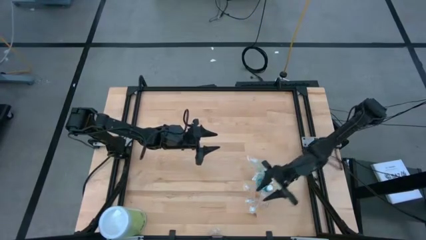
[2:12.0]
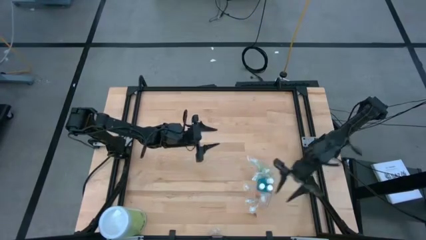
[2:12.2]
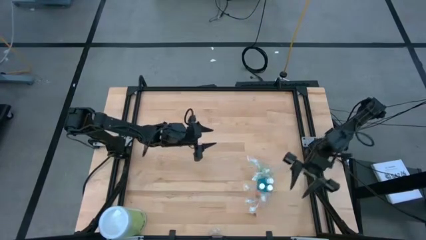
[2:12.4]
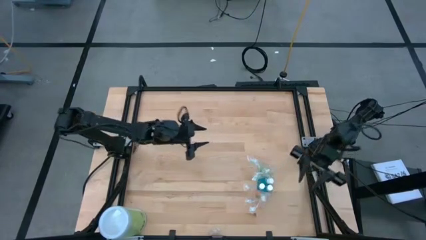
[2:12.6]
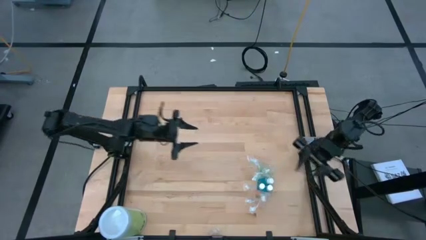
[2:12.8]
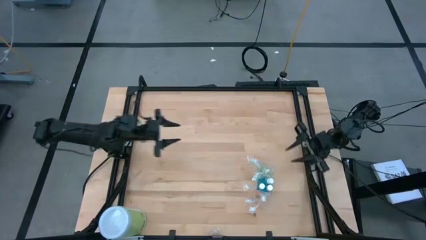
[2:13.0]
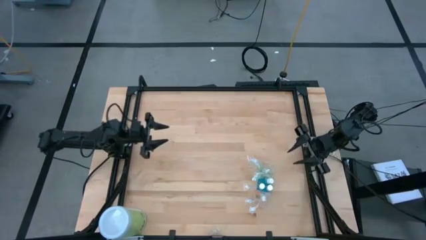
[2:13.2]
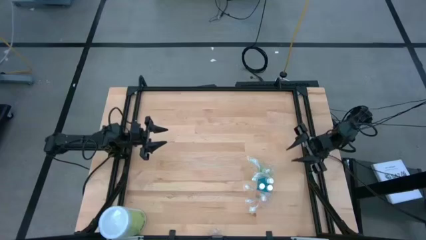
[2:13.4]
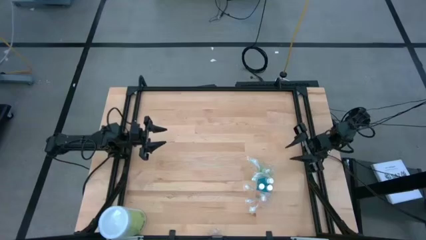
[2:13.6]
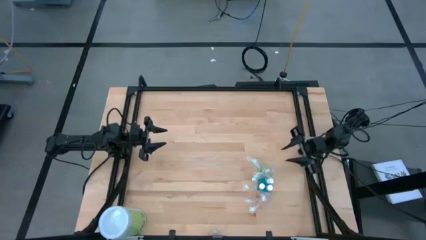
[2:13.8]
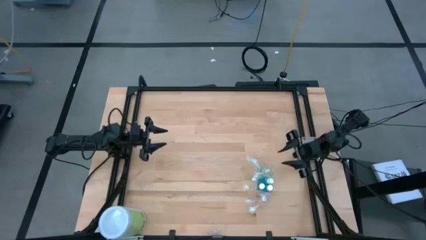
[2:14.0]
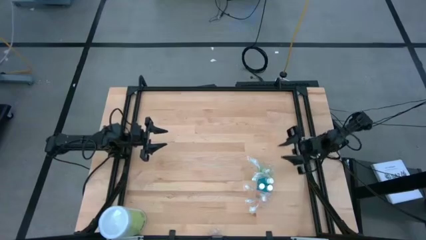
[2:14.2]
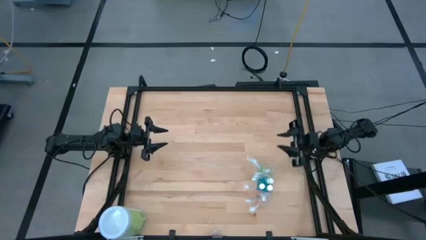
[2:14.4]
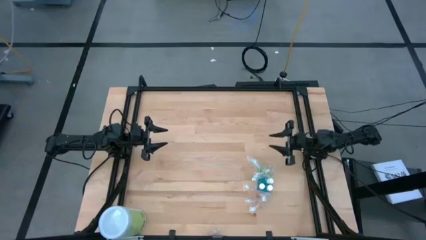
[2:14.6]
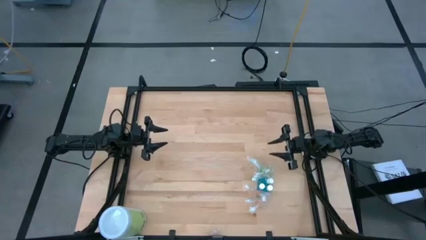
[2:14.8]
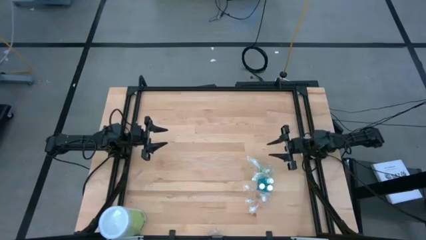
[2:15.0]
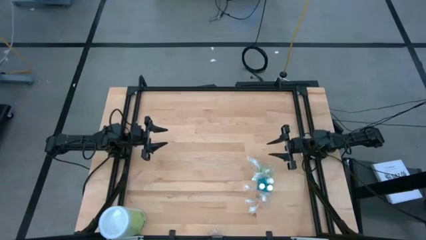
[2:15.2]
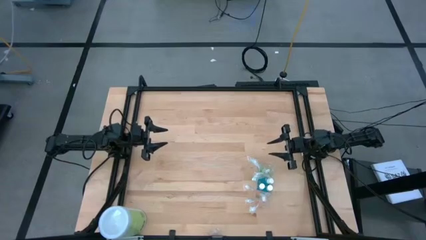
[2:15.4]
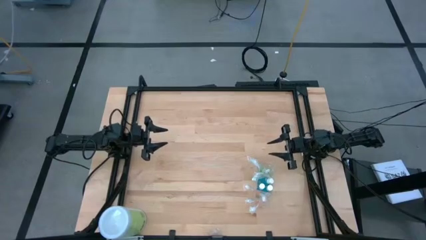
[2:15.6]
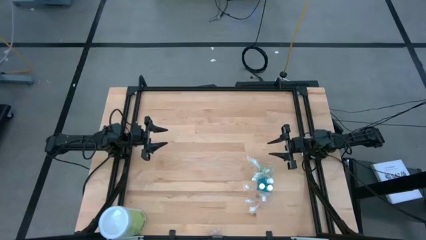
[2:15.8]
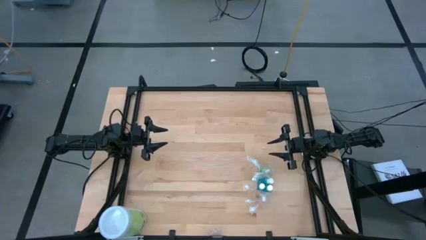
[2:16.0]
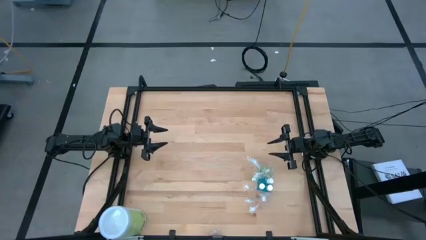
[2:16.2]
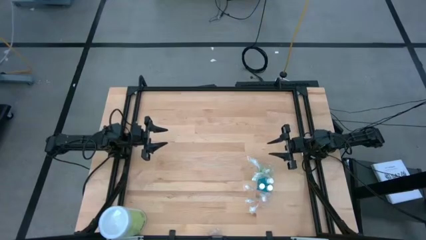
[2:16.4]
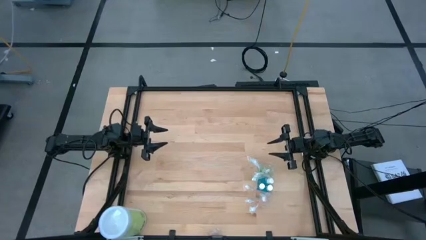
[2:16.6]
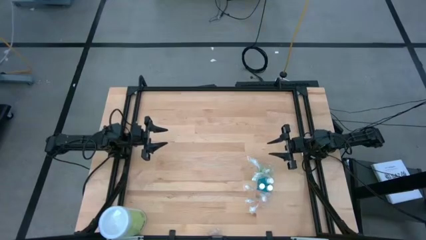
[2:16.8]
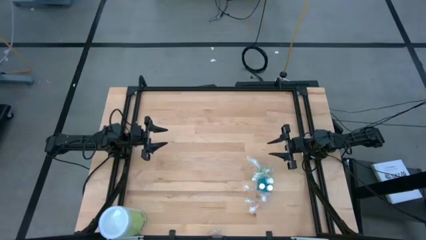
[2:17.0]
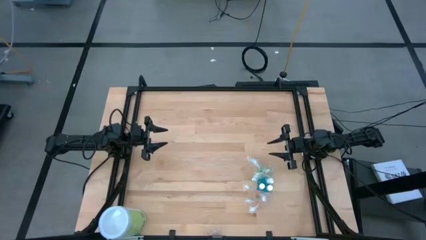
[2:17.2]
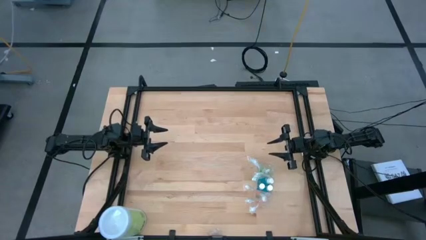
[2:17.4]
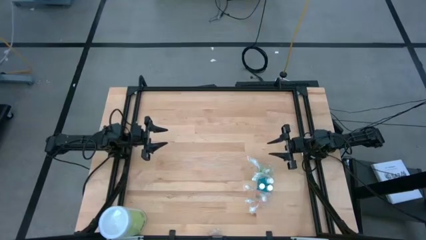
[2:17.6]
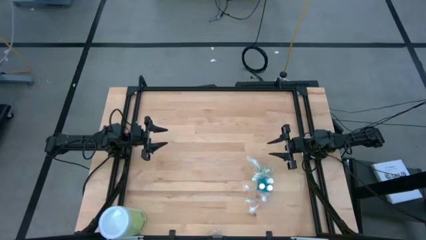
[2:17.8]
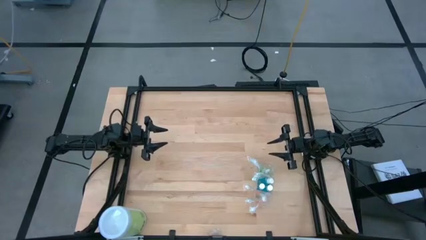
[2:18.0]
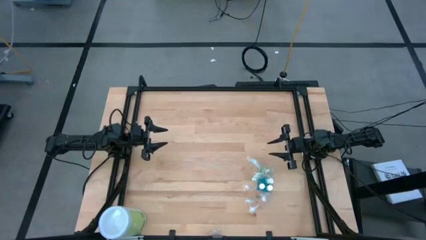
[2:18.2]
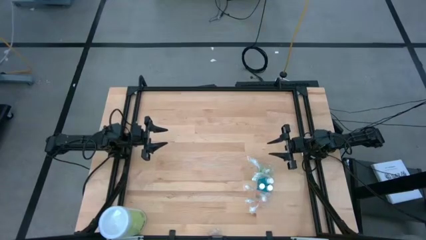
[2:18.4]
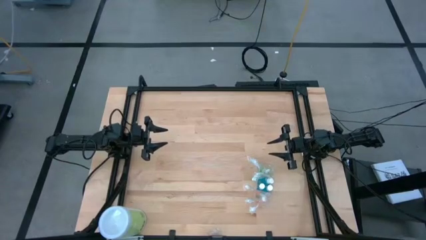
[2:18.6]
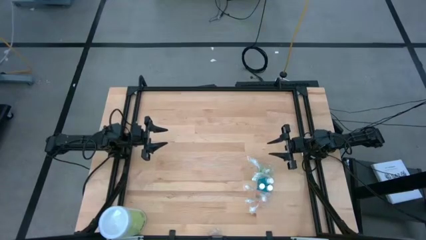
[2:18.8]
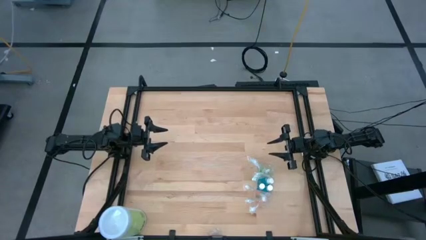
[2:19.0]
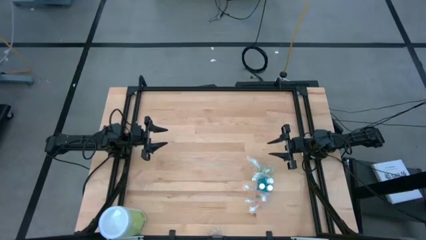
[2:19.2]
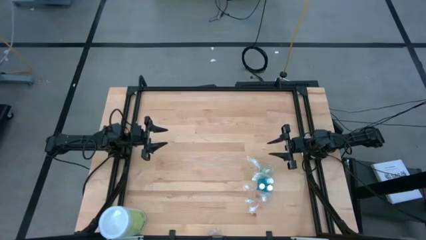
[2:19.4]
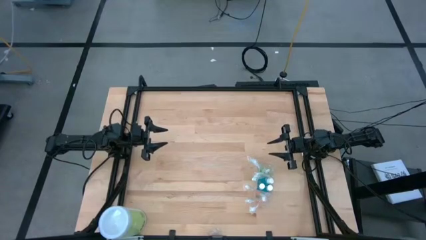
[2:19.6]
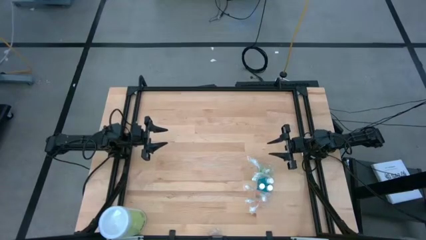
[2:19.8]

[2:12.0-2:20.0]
Task: Pick & Place toothbrushing station
Return to Home Position

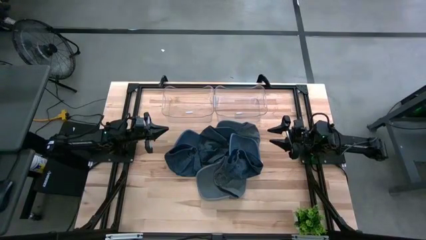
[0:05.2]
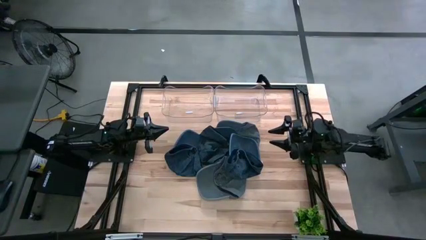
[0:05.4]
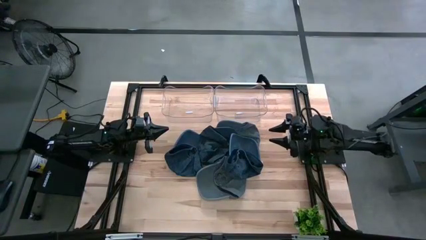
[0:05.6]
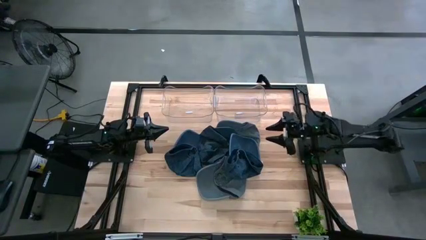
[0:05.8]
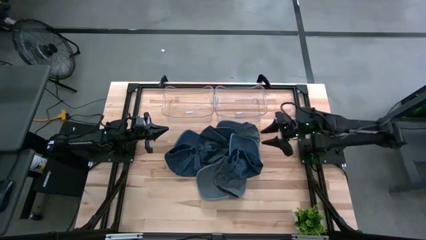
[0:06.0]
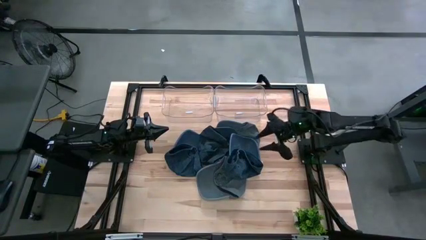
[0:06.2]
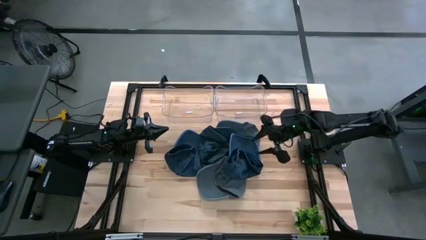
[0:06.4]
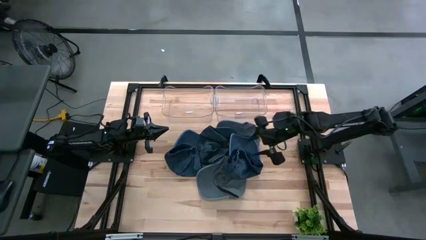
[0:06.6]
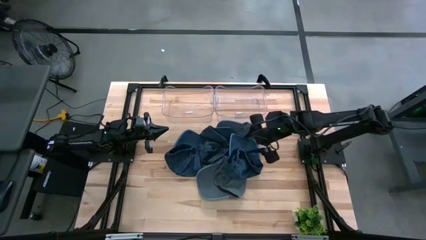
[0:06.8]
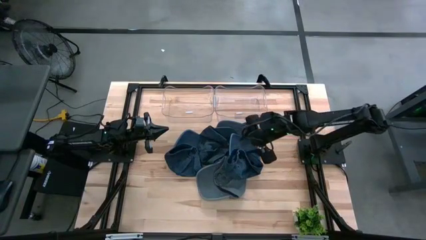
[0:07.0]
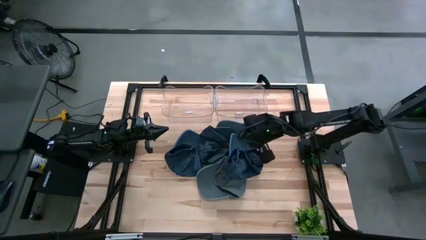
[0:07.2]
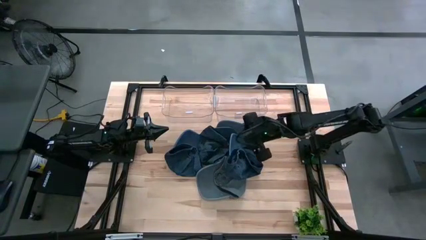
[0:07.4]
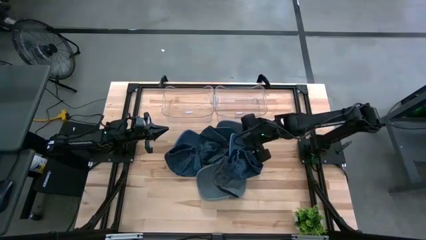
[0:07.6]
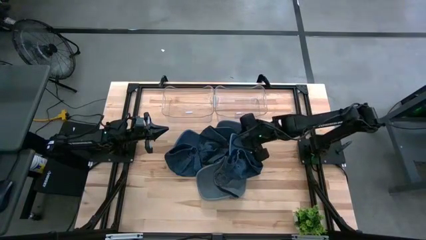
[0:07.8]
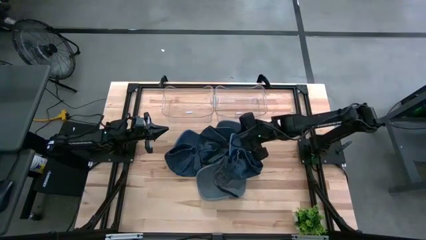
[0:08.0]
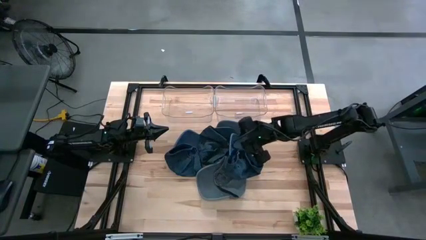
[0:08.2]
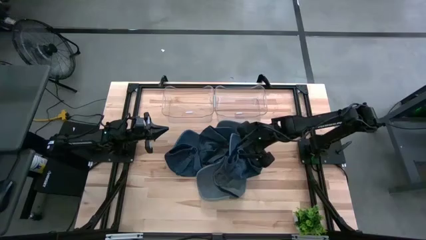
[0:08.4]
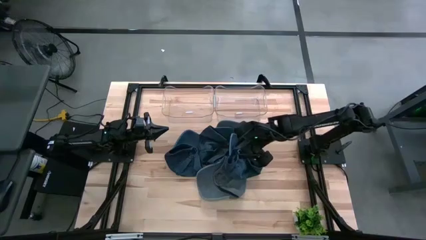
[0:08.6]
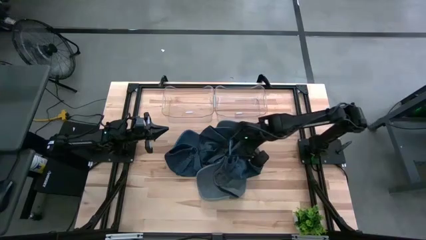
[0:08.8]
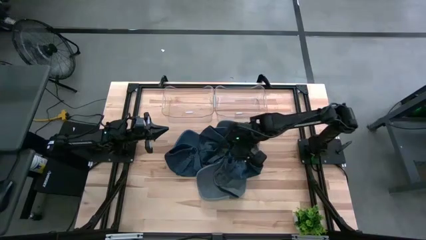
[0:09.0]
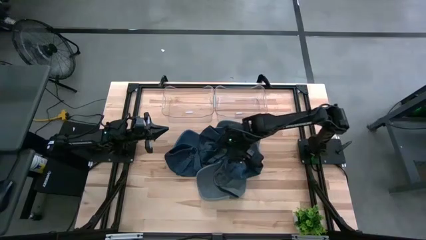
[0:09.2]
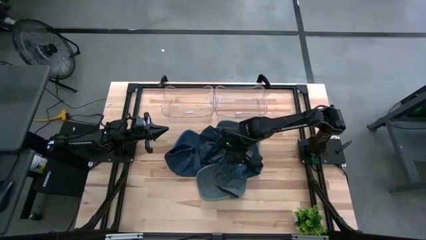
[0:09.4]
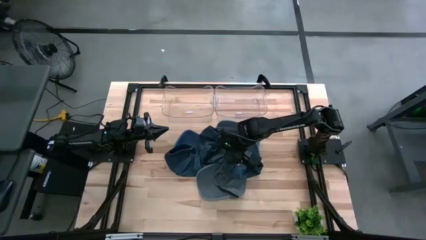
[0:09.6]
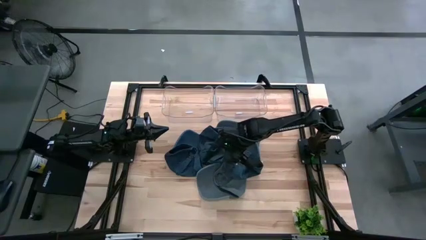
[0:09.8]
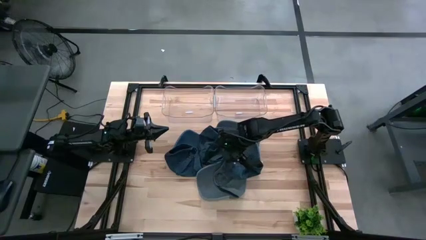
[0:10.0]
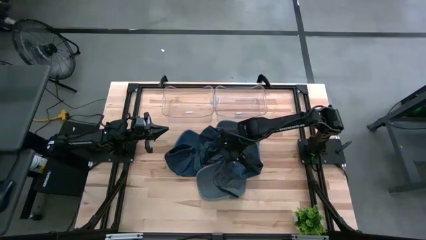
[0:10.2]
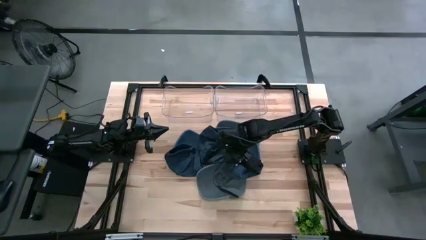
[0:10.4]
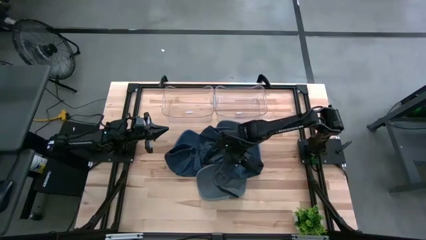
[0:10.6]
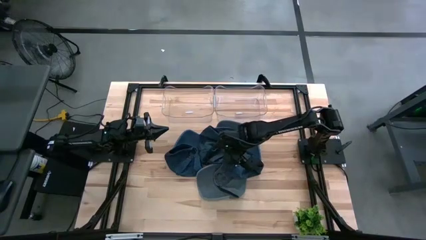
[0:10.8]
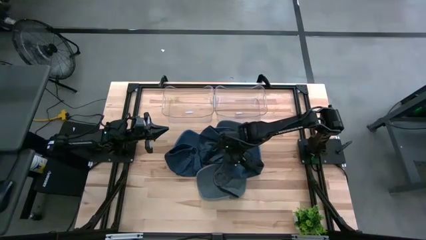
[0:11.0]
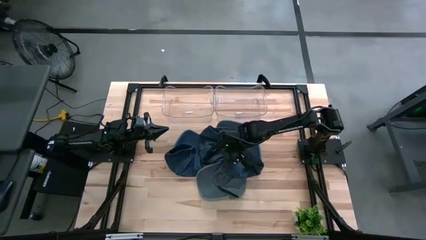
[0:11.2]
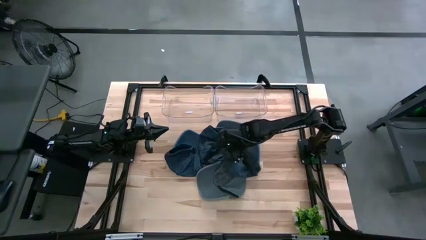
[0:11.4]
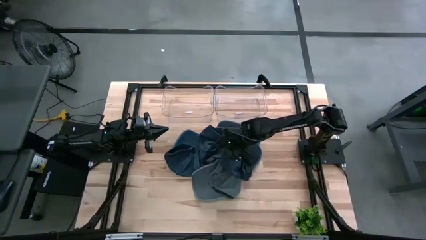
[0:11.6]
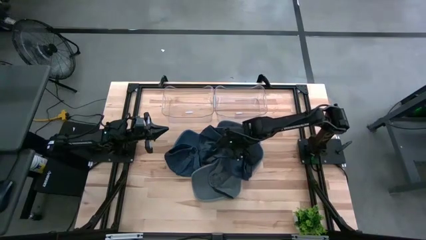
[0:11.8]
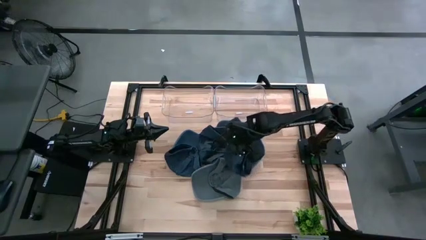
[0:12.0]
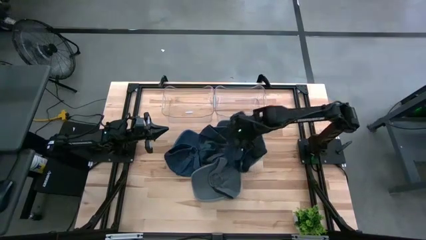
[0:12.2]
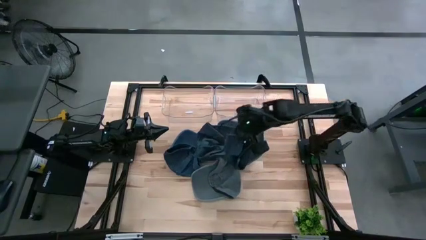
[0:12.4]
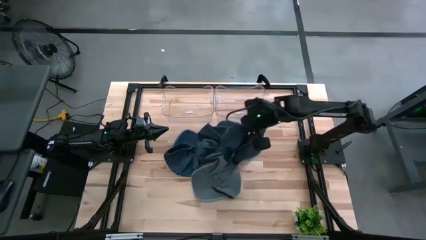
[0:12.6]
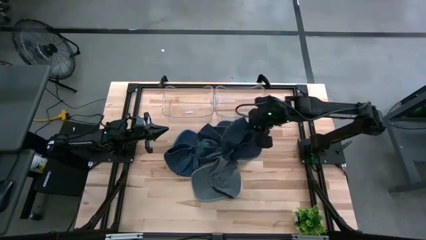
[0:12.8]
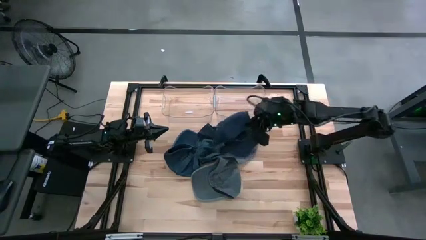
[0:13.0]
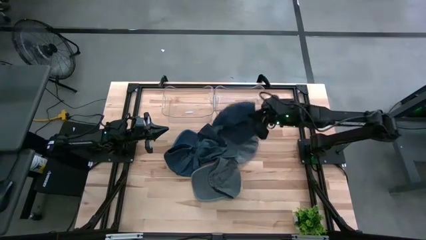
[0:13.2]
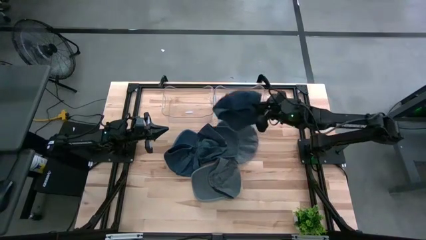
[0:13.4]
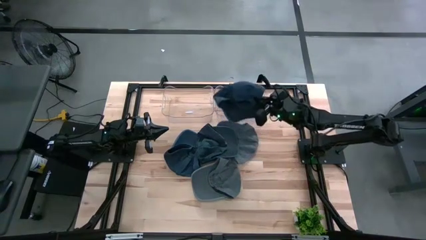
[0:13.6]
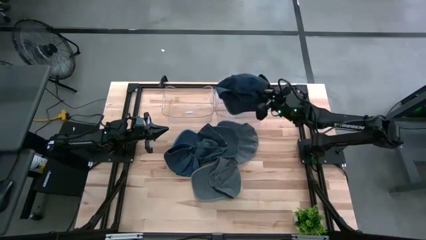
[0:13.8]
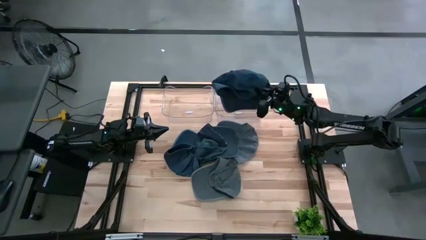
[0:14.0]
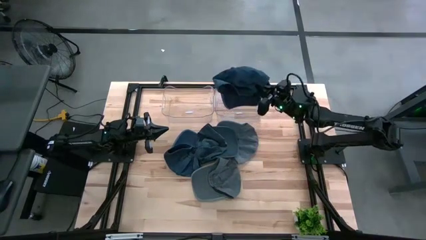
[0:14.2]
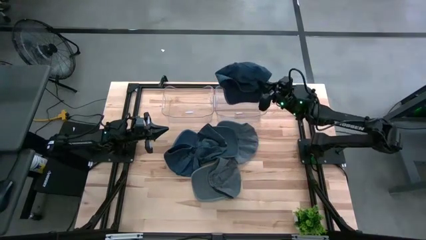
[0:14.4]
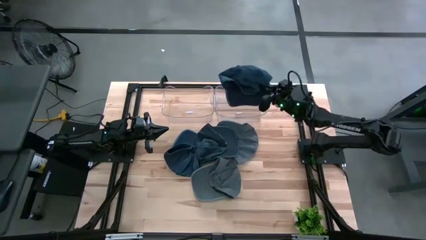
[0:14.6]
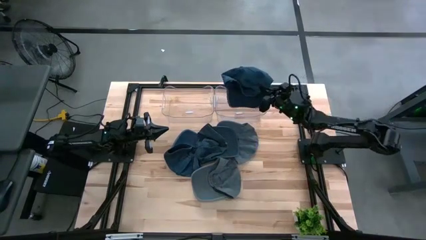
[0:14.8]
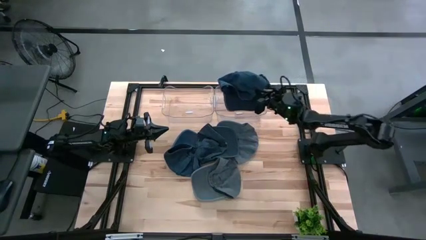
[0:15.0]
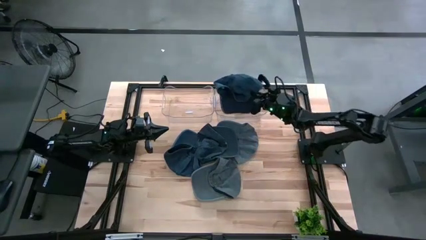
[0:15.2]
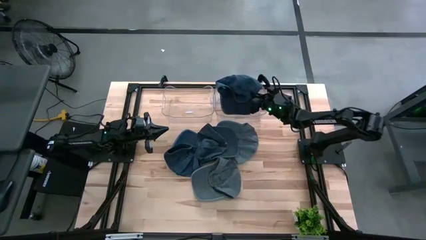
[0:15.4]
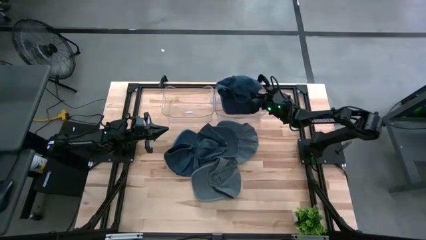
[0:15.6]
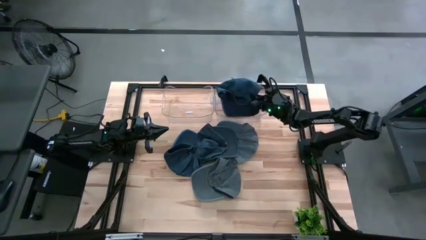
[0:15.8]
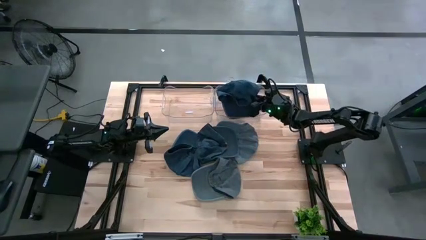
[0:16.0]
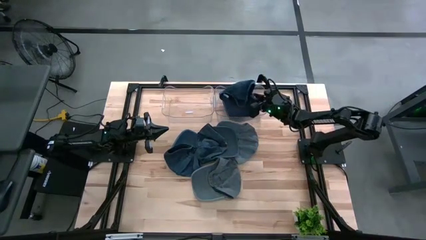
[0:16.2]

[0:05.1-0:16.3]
Task: Pick & Place hat
Put the dark blue cap into the right transparent bin
